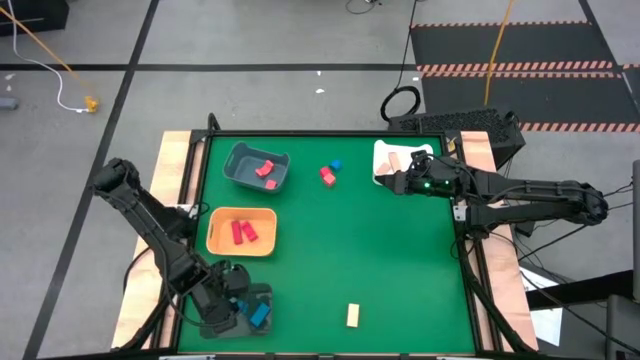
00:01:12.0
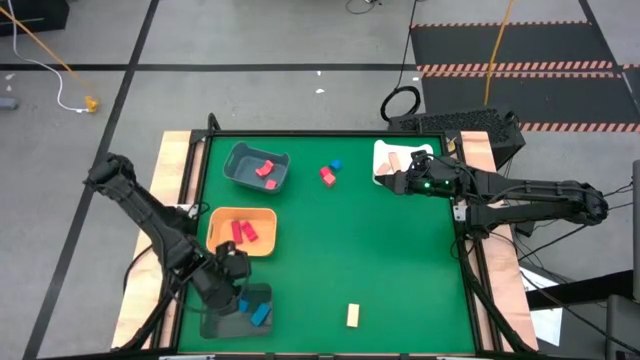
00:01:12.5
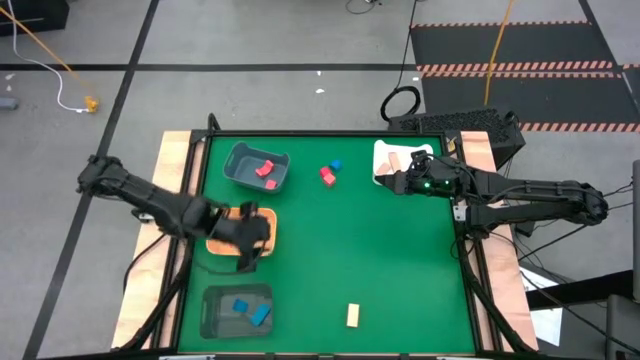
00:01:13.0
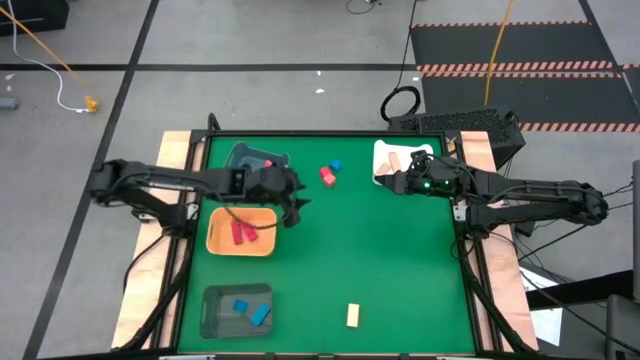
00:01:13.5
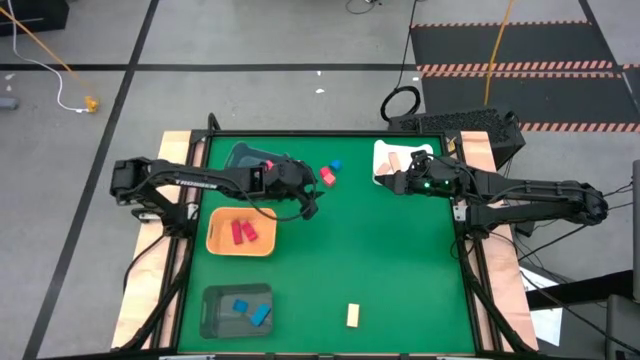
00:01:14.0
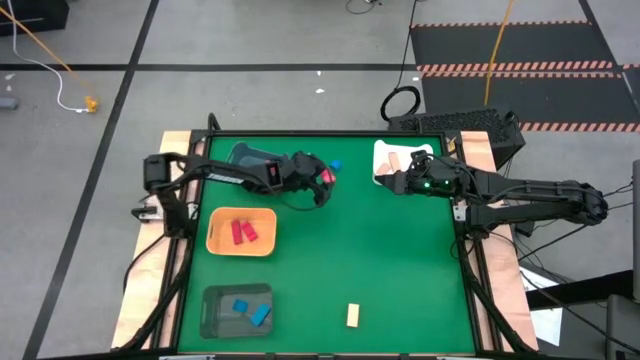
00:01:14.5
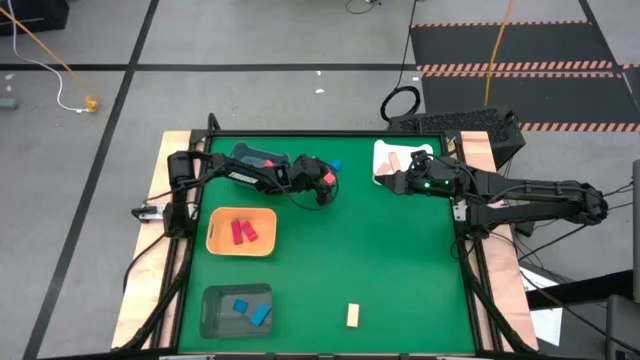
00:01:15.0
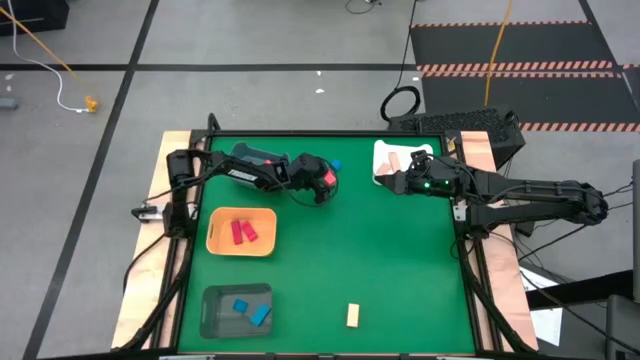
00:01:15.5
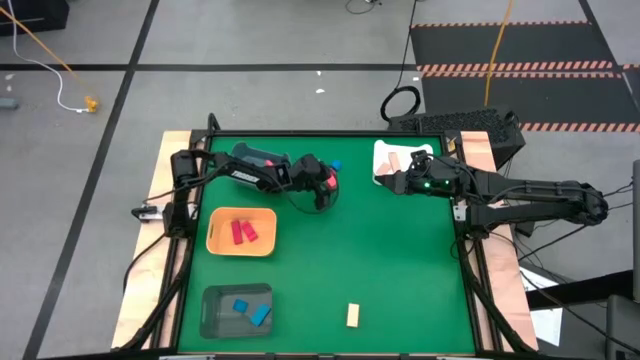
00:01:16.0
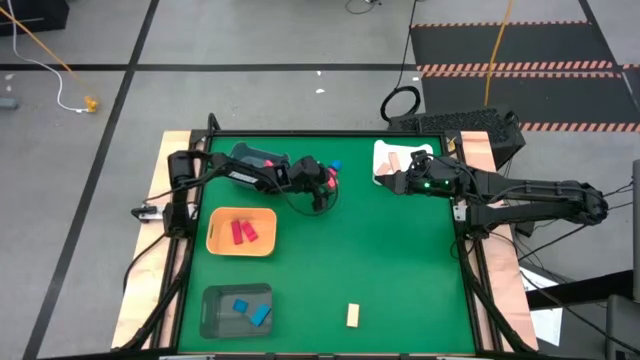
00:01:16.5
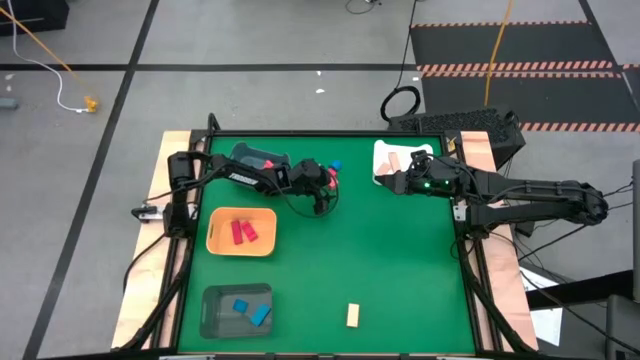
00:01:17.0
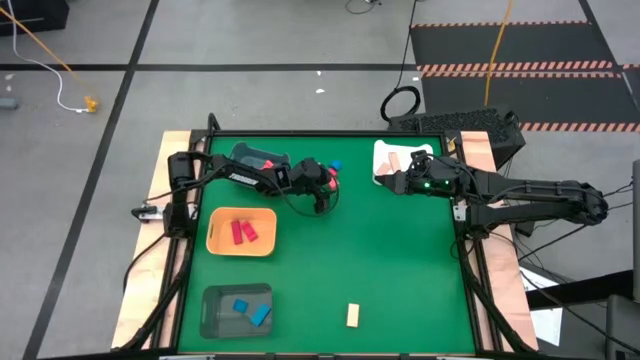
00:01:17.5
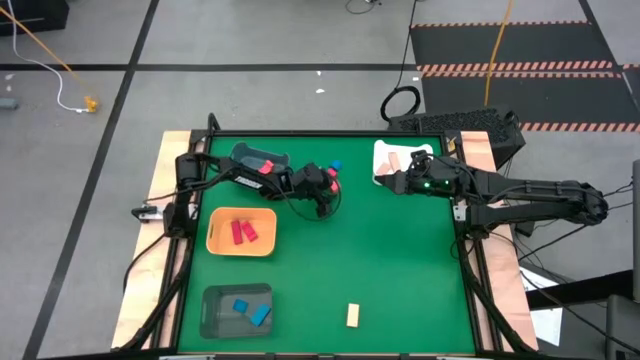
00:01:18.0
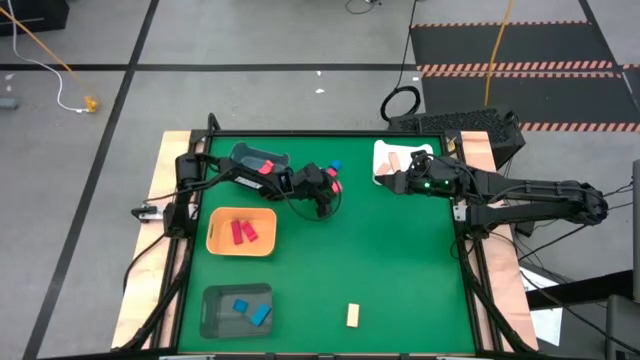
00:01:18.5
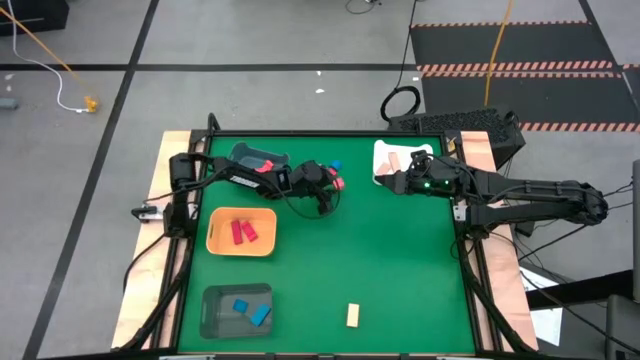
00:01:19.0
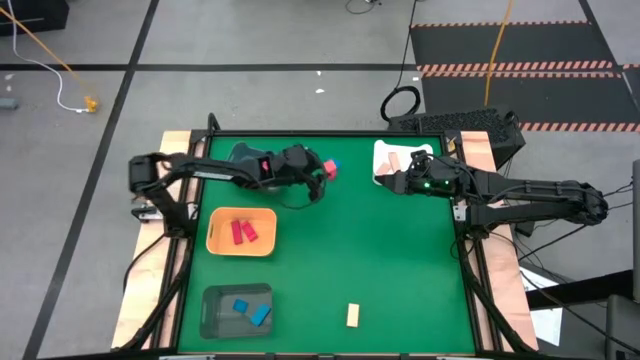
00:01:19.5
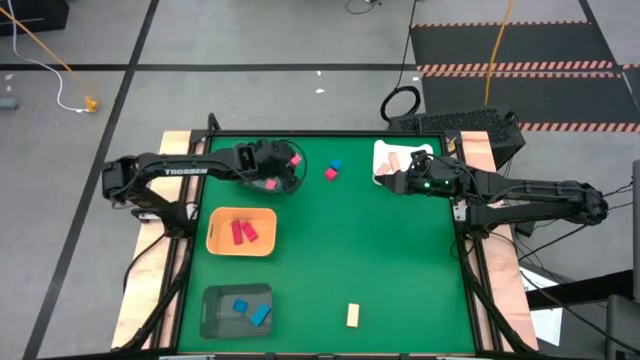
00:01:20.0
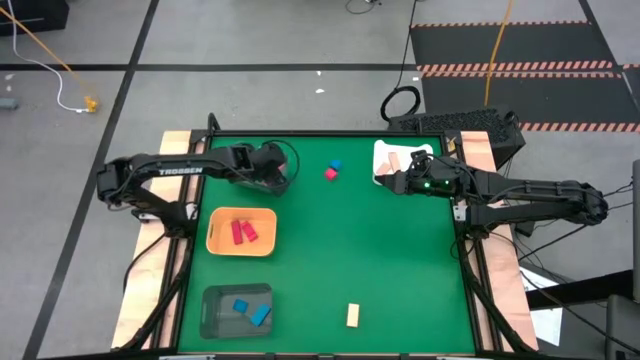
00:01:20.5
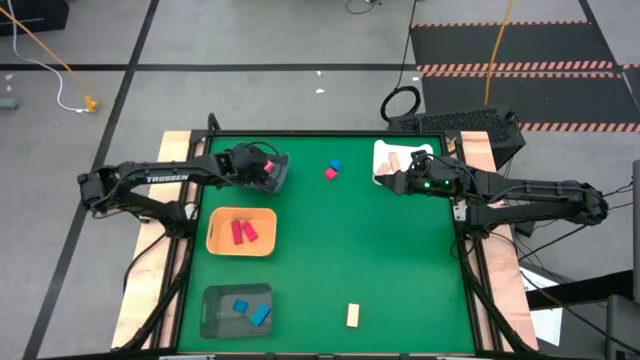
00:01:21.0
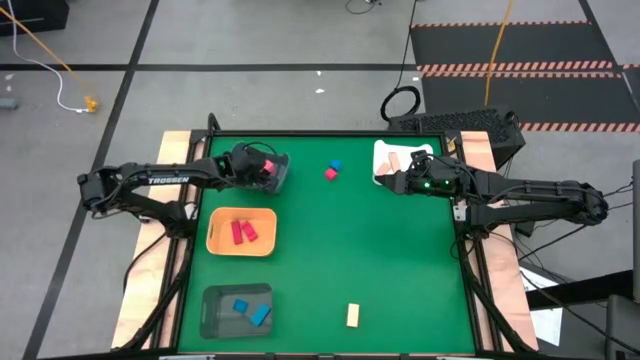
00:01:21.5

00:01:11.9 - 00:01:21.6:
Task: Sort & place blocks by color
Put the orange block into the blue bin

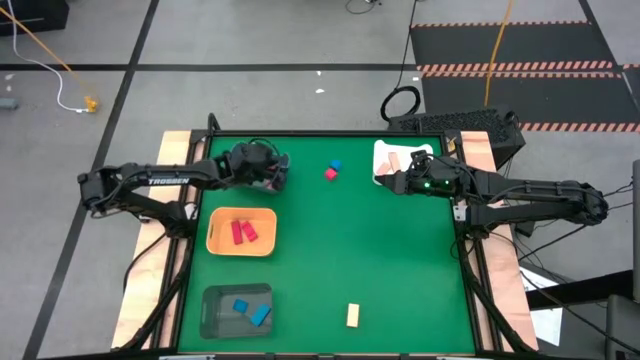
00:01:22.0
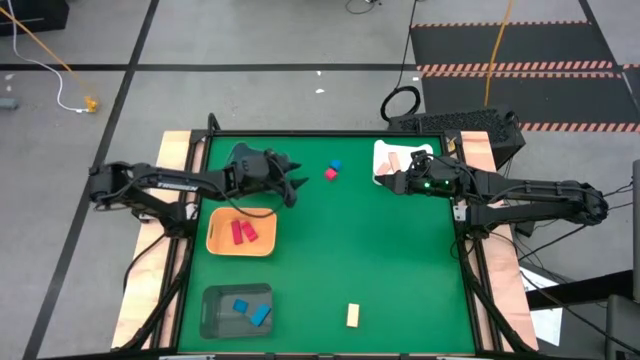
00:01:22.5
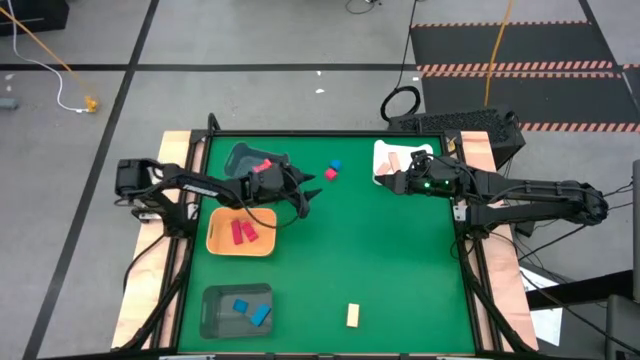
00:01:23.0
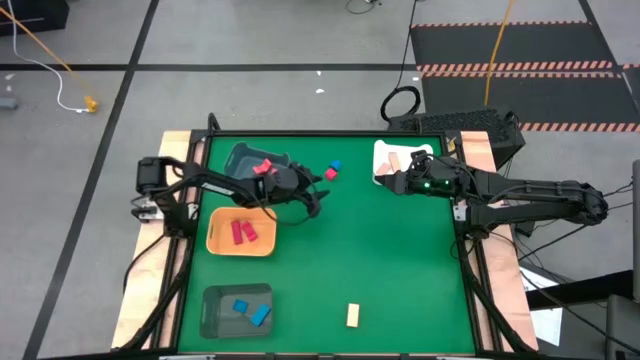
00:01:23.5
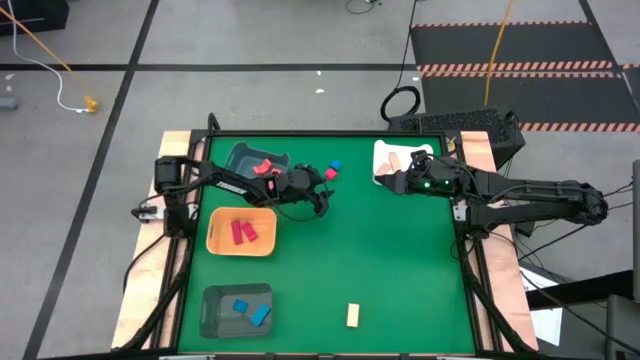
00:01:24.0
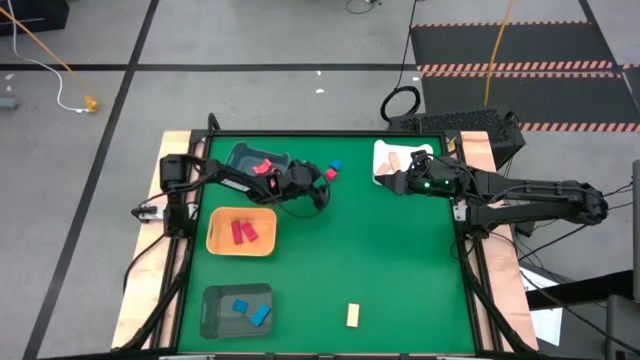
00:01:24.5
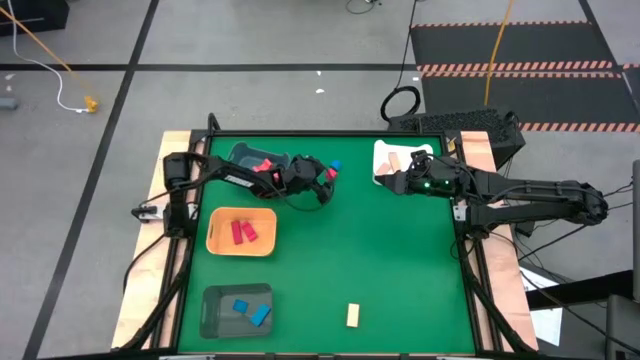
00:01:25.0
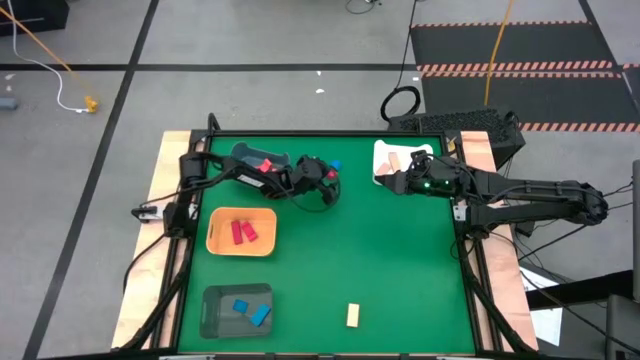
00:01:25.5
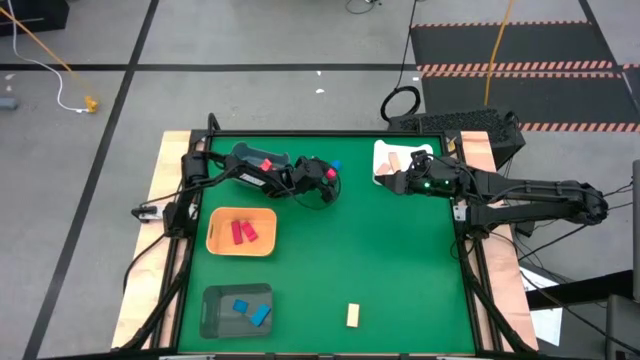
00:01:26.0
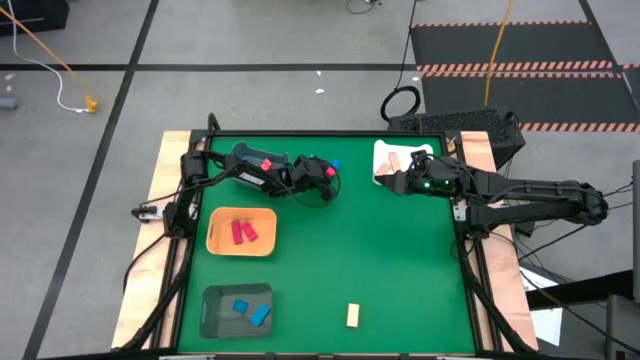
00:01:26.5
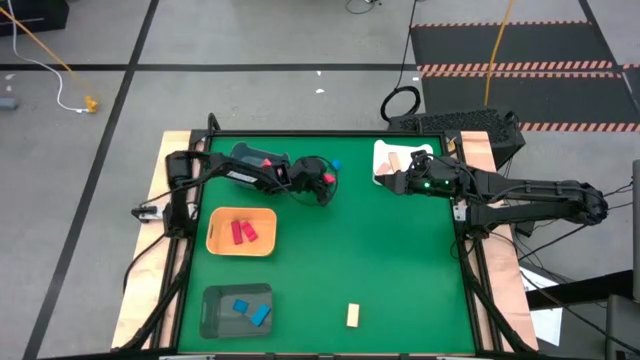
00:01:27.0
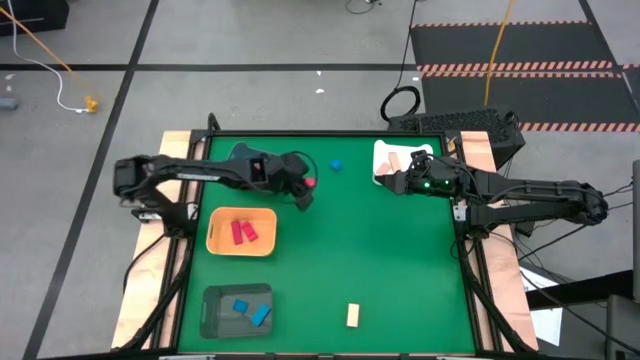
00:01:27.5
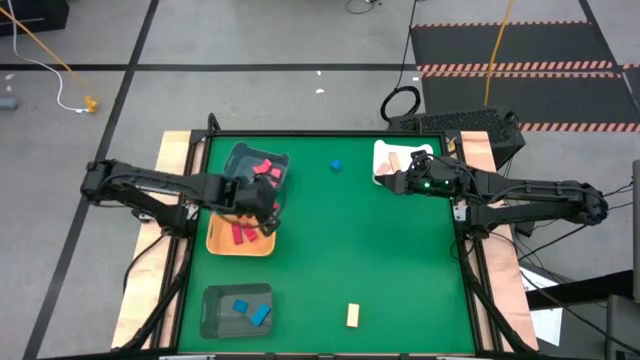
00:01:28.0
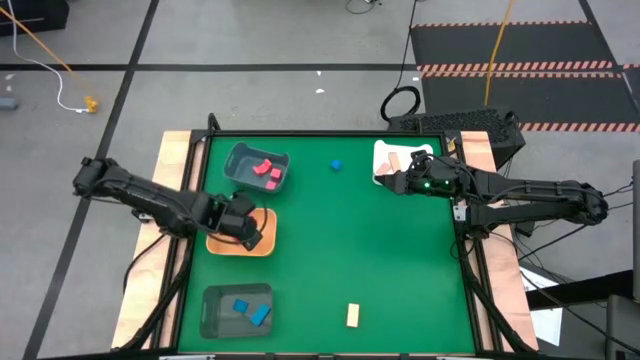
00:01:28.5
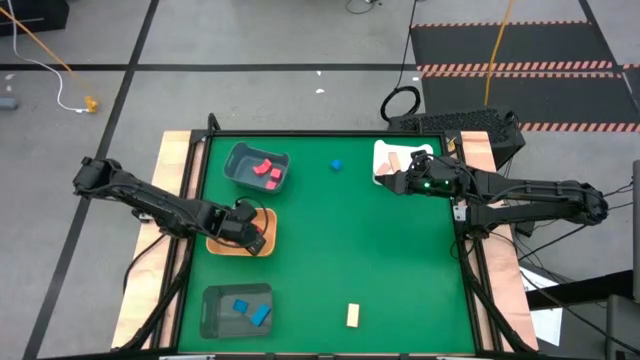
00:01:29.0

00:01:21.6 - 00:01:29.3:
Put the red block into the yellow bin

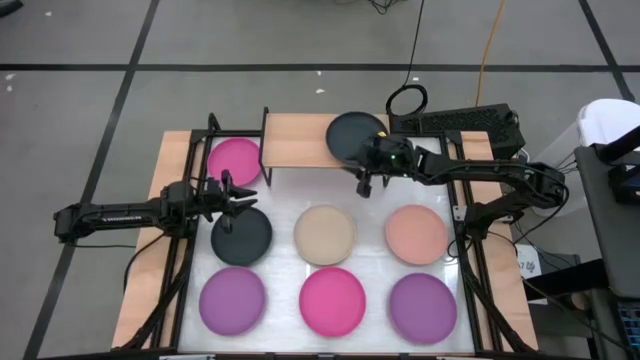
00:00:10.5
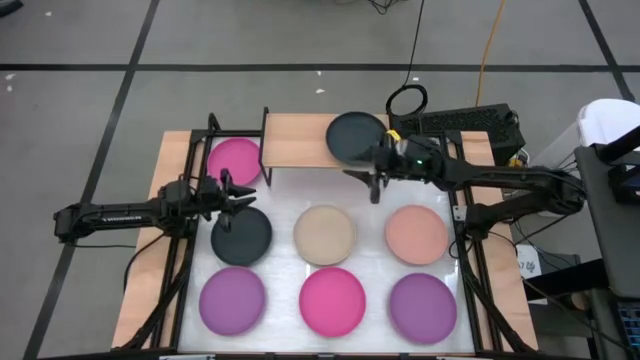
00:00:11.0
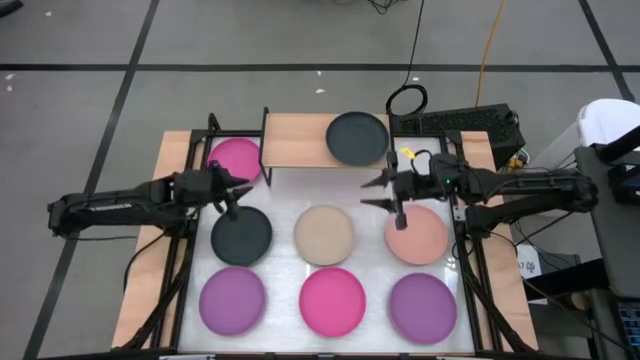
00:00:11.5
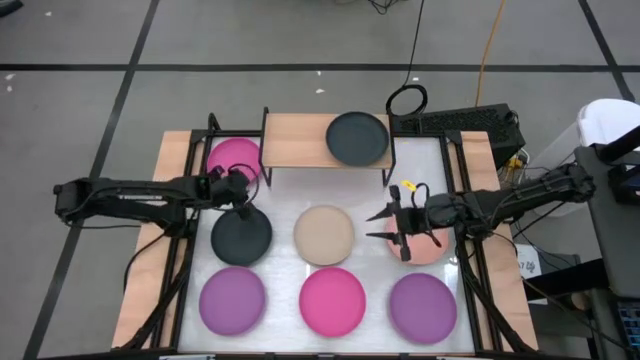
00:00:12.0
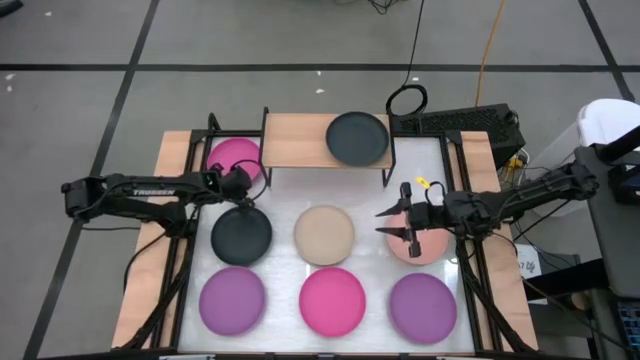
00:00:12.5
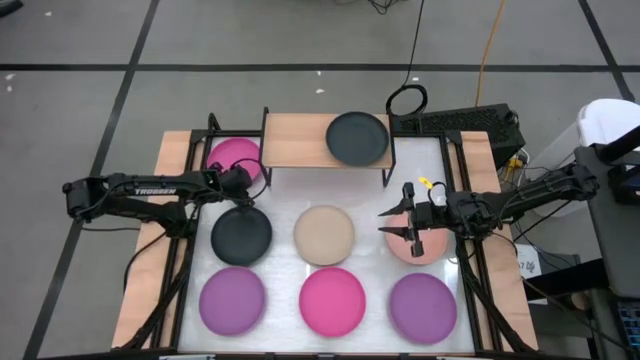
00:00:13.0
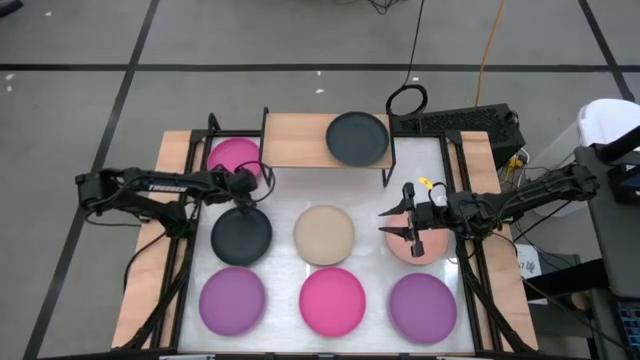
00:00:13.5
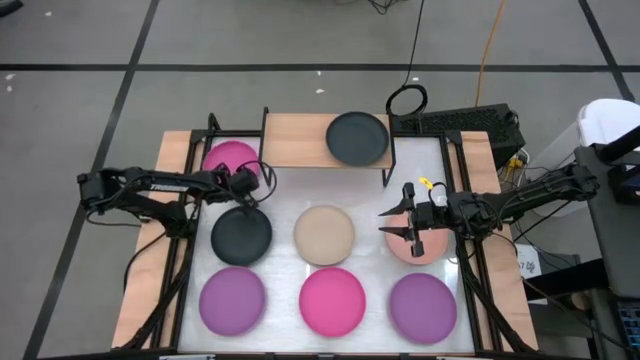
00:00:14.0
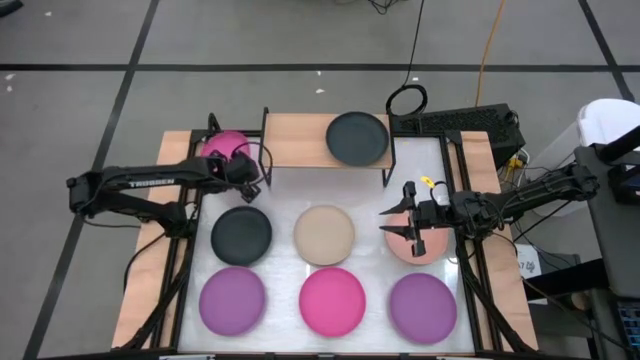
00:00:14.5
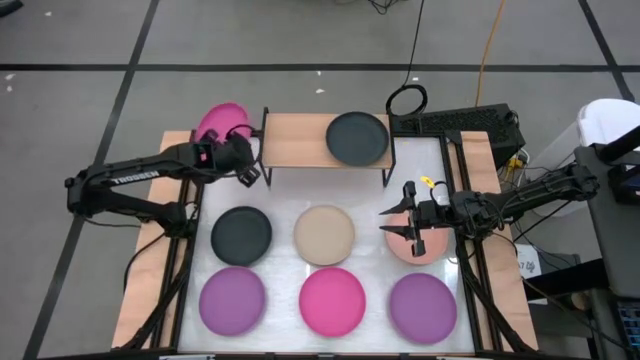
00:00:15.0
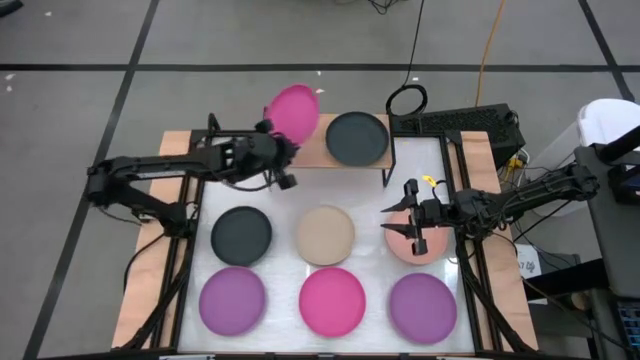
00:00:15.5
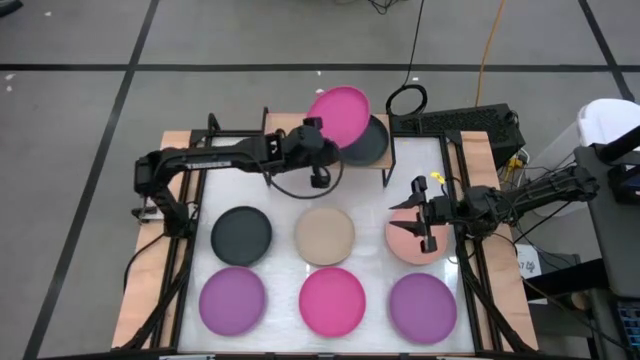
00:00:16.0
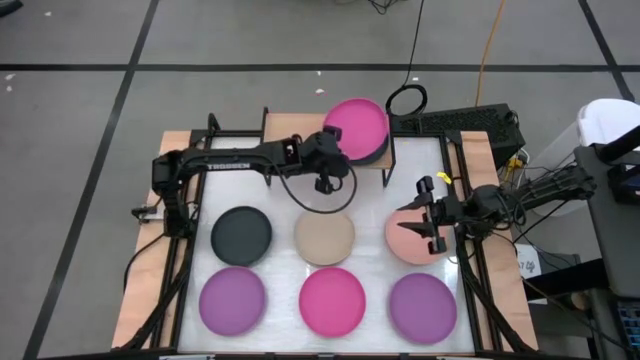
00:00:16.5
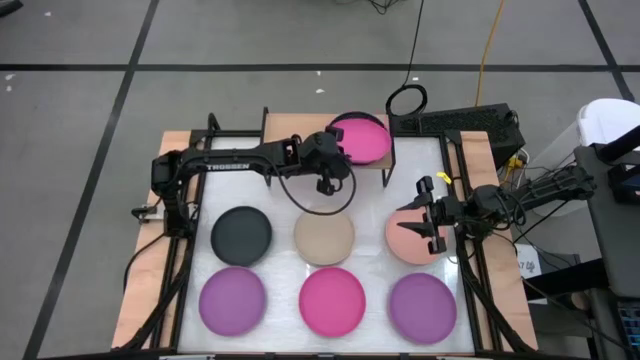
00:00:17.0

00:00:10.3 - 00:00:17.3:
Task: Place and stack plates onto a shelf
Stack the top pink plate on top of the black plate on the shelf
